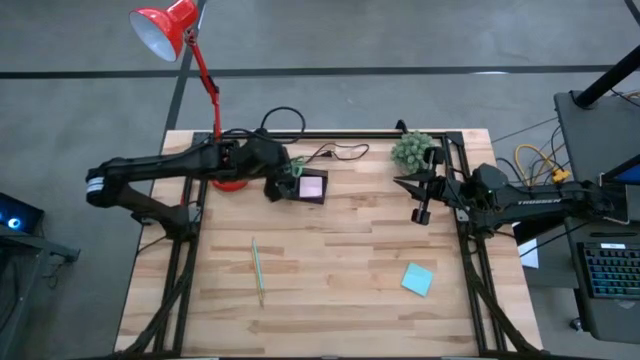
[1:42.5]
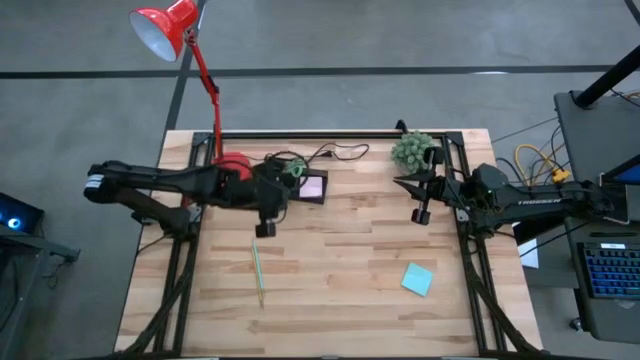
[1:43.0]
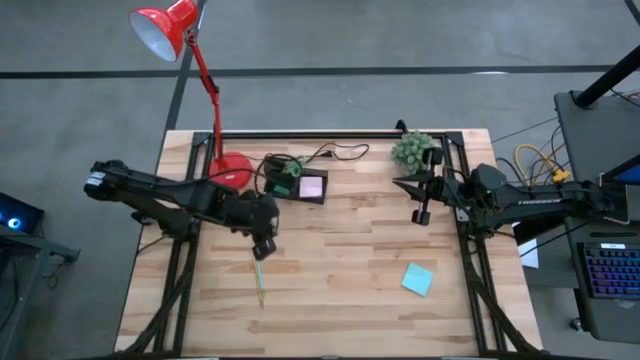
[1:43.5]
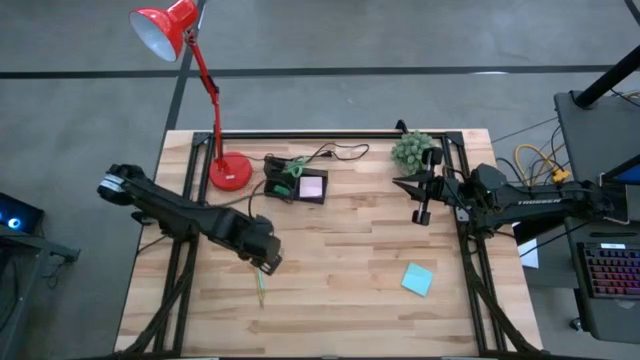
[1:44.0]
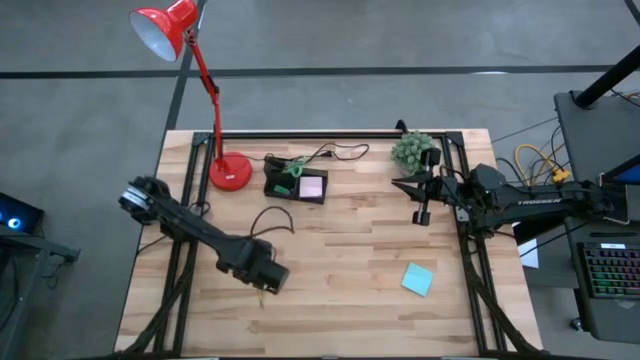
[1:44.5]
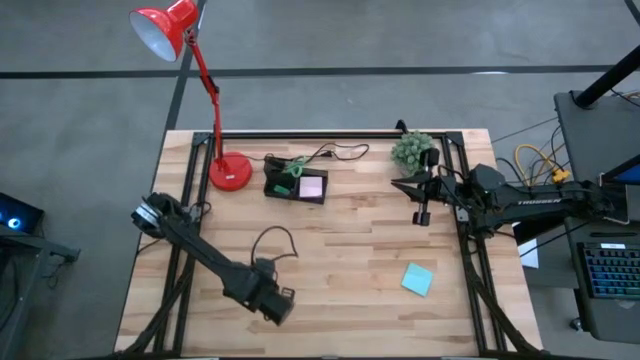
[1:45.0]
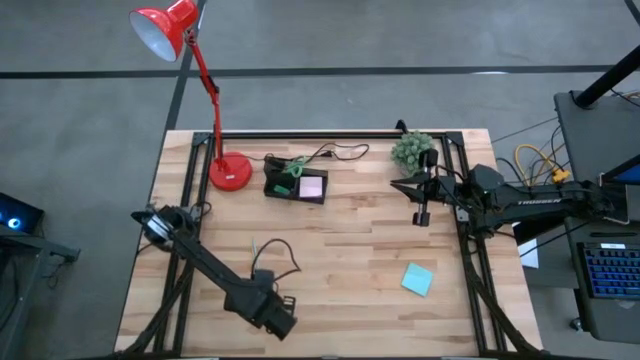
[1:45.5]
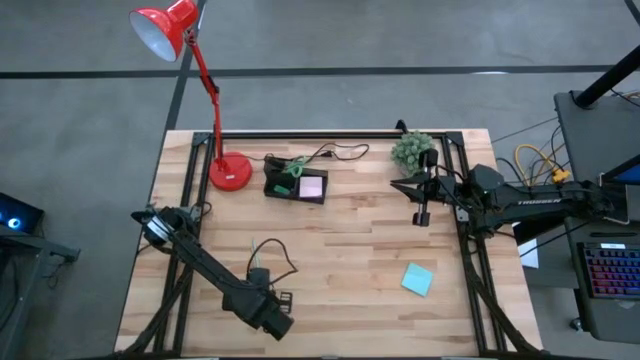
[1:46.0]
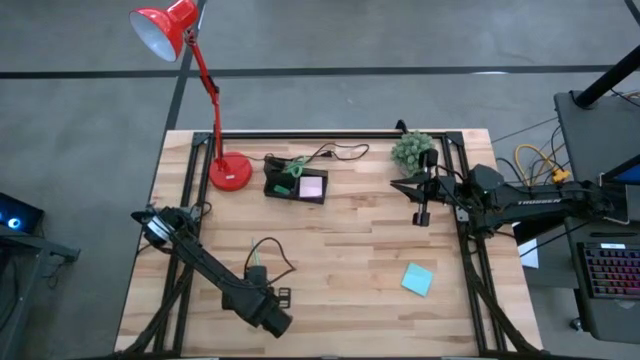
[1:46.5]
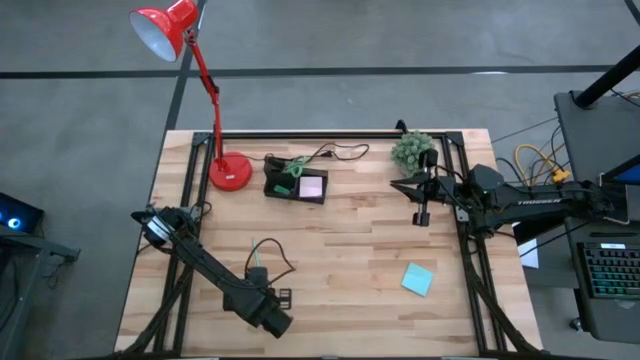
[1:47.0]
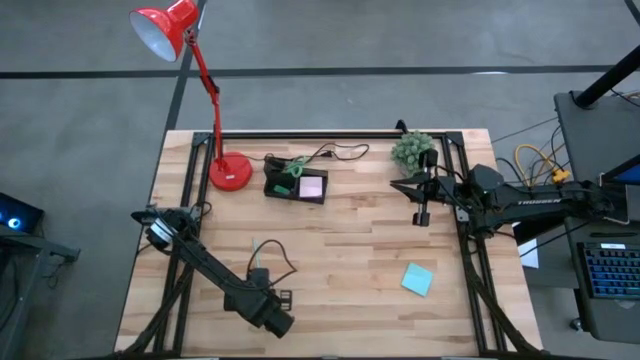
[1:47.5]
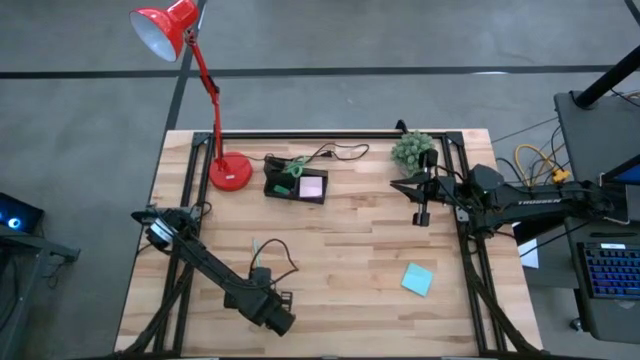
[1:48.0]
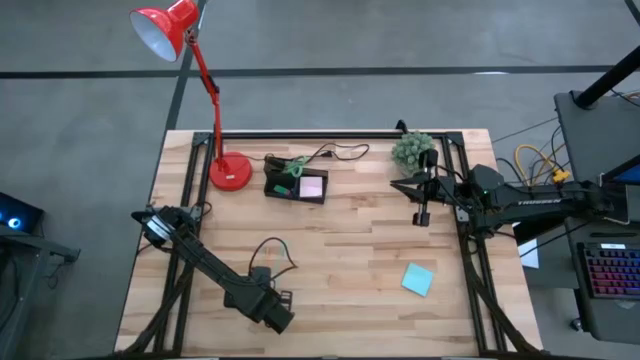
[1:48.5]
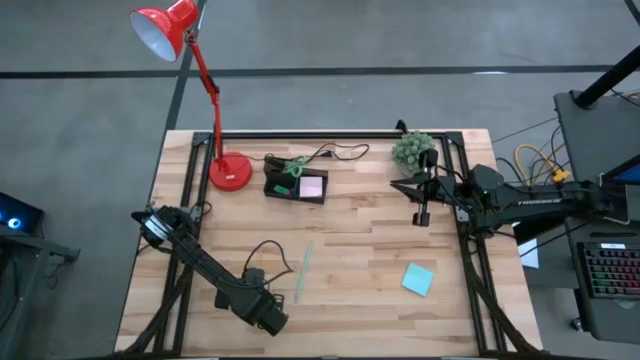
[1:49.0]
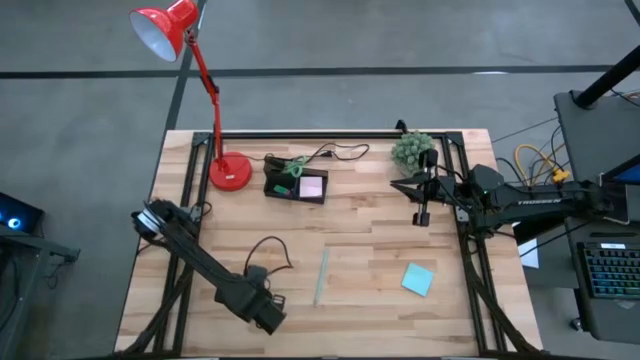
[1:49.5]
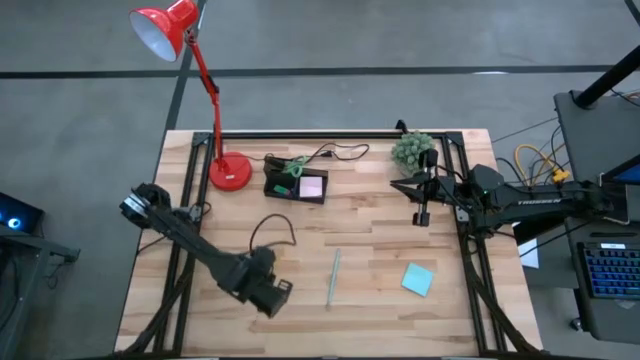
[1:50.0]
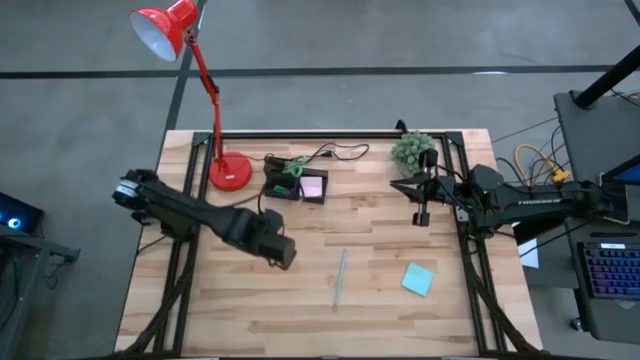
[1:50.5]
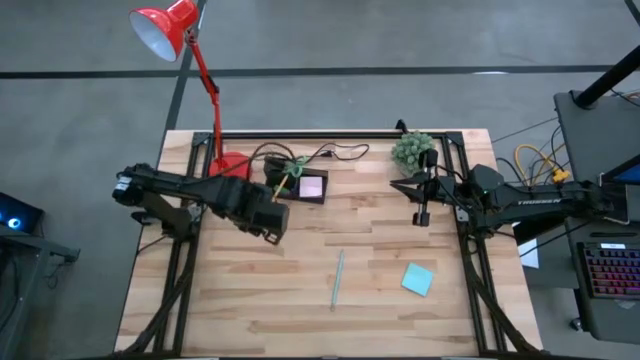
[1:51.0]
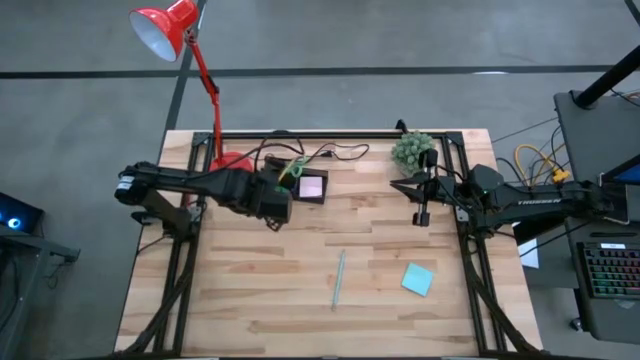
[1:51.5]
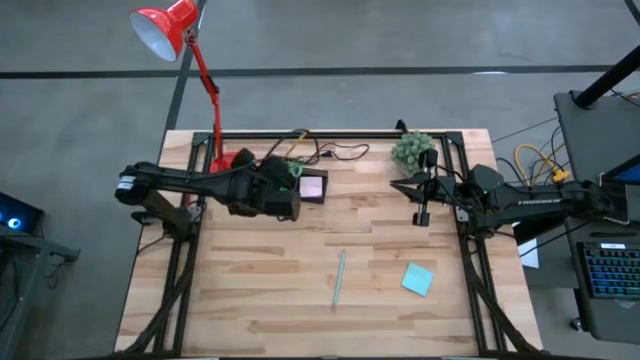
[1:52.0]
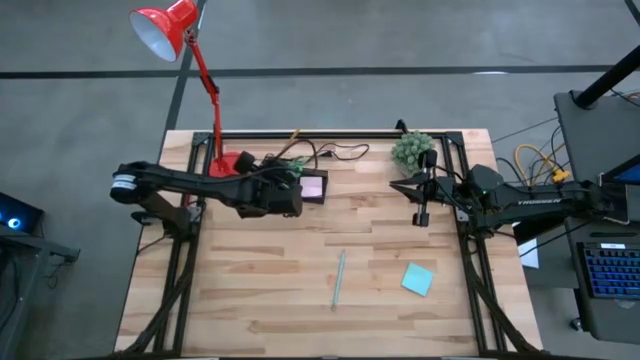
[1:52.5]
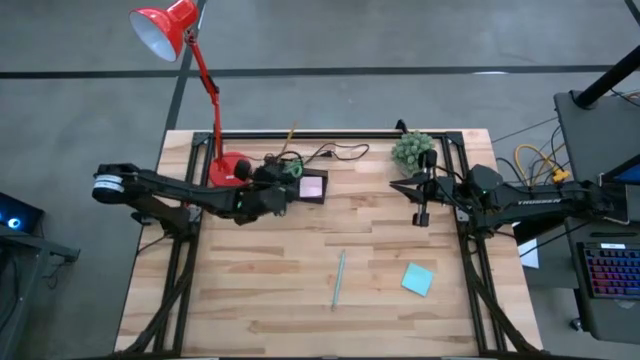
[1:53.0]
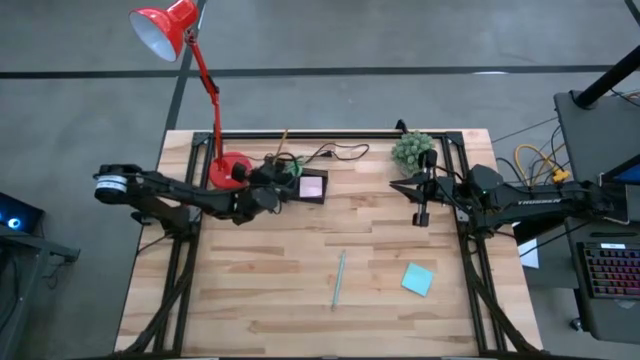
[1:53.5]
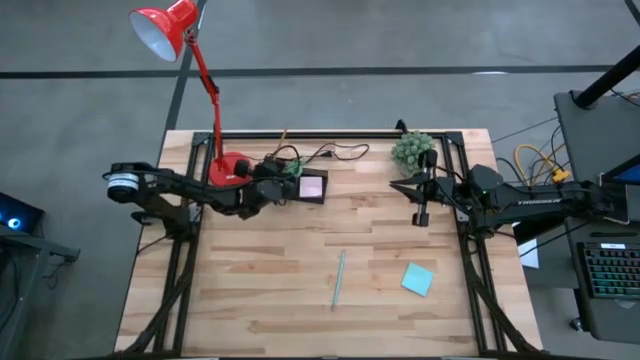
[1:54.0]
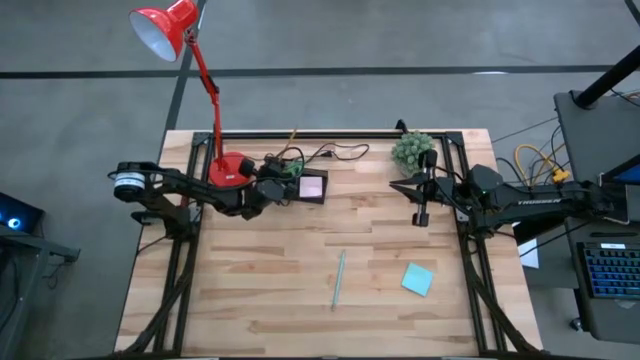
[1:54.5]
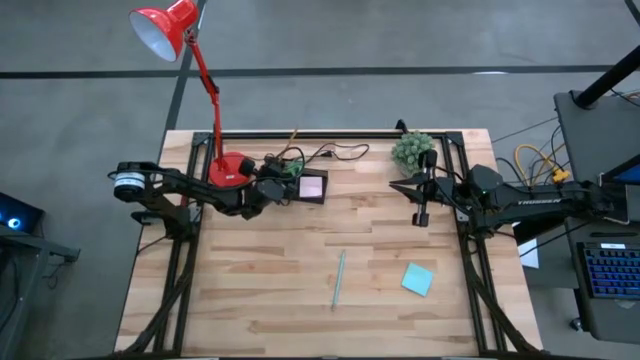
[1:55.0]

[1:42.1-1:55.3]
Task: Pick and place office supplies into organizer
Put the yellow pencil into the black mesh desk organizer

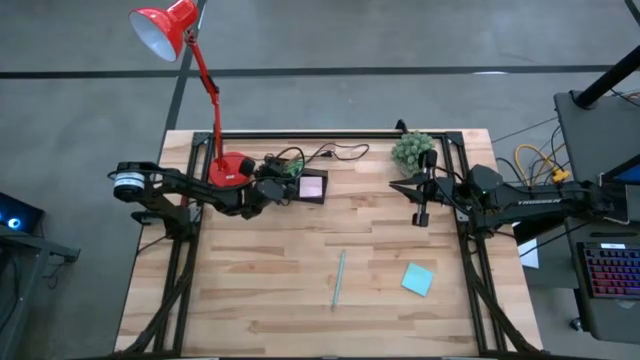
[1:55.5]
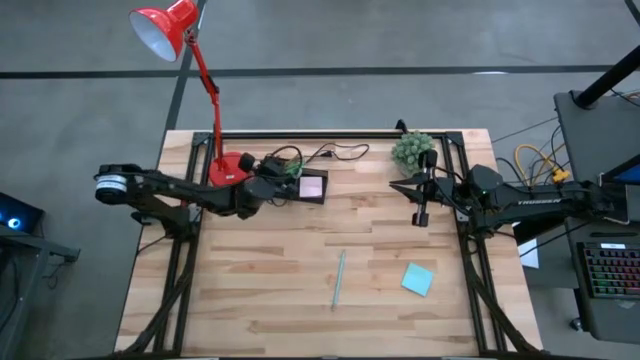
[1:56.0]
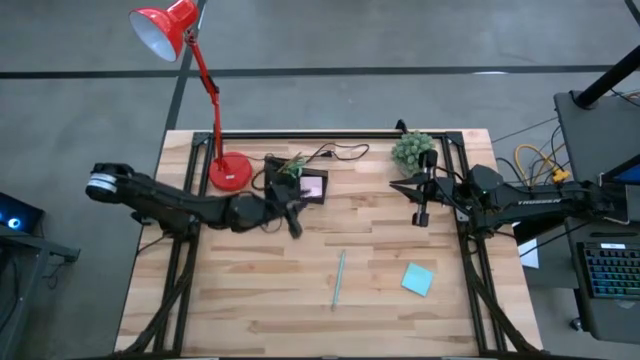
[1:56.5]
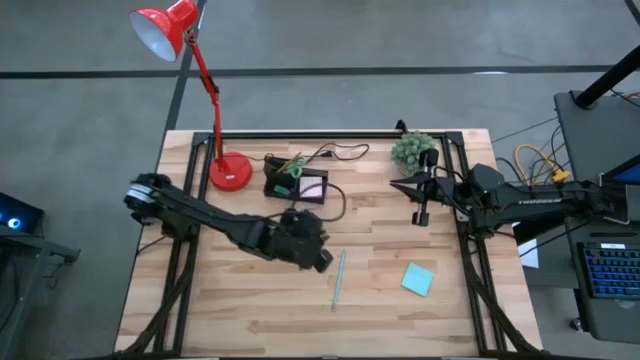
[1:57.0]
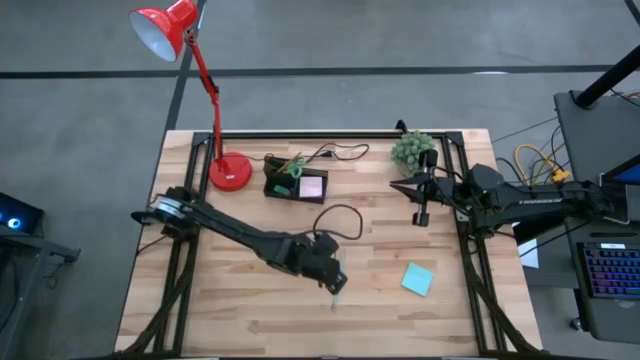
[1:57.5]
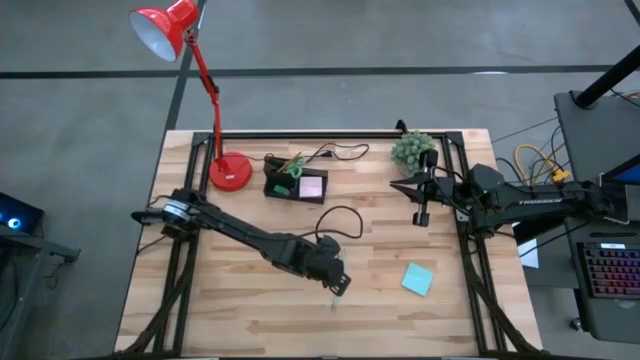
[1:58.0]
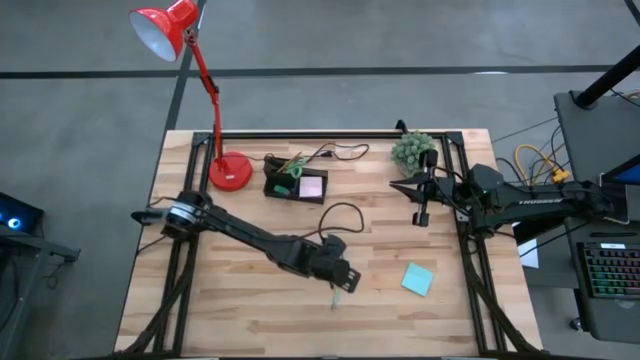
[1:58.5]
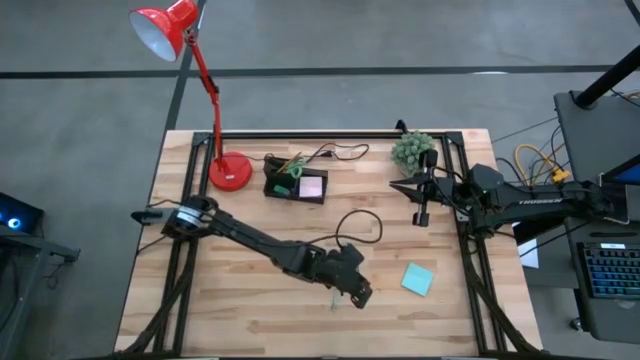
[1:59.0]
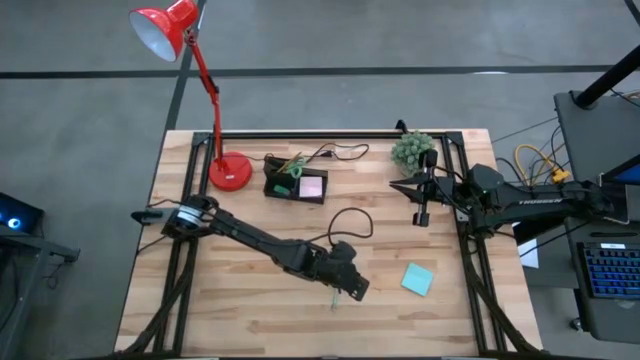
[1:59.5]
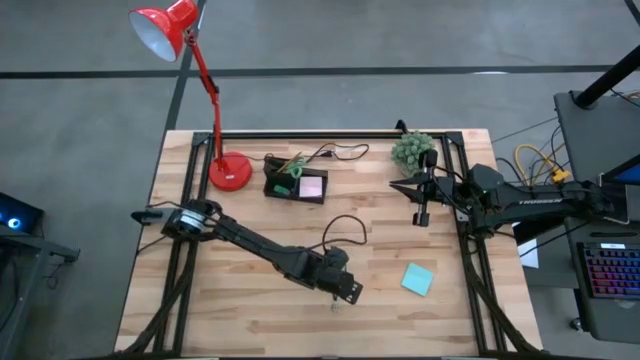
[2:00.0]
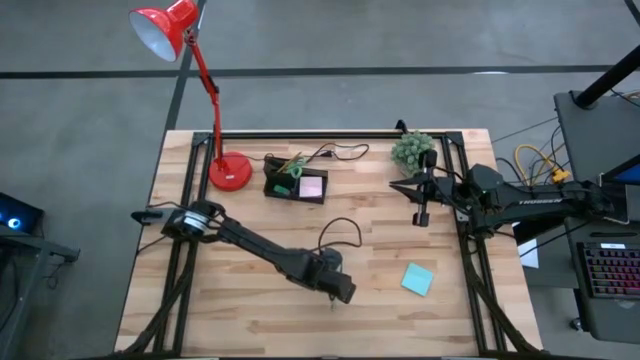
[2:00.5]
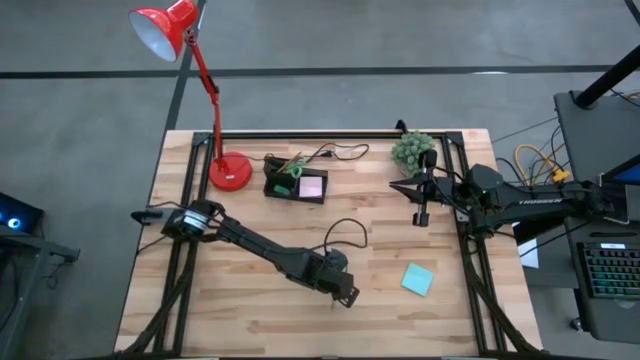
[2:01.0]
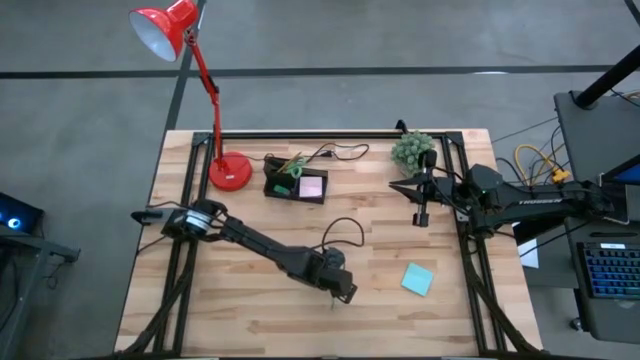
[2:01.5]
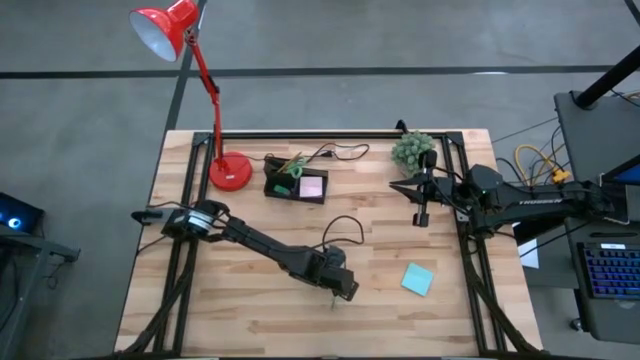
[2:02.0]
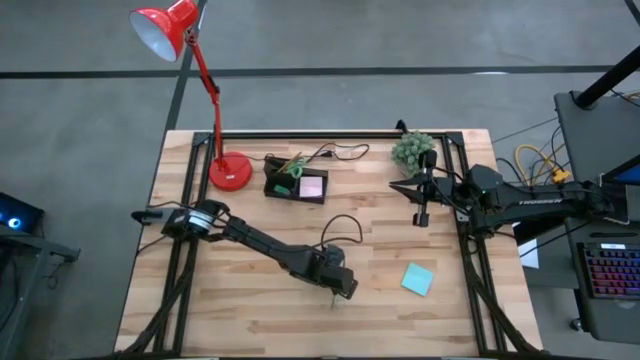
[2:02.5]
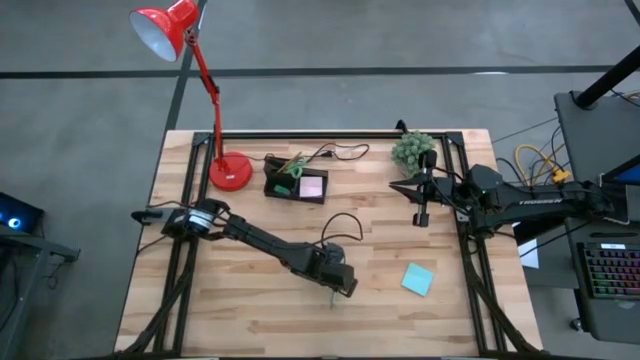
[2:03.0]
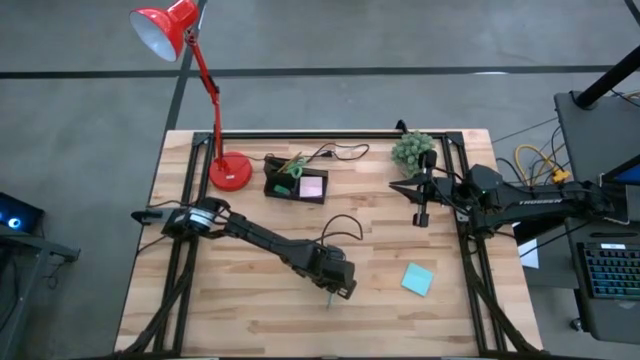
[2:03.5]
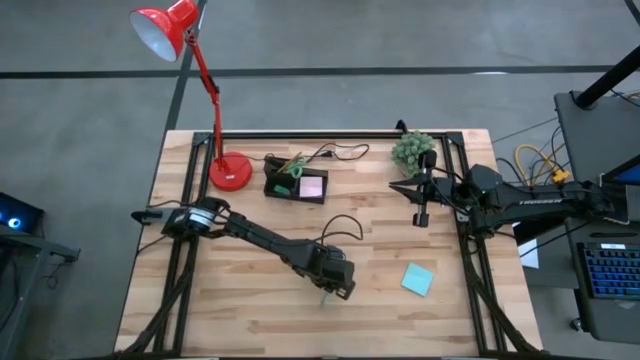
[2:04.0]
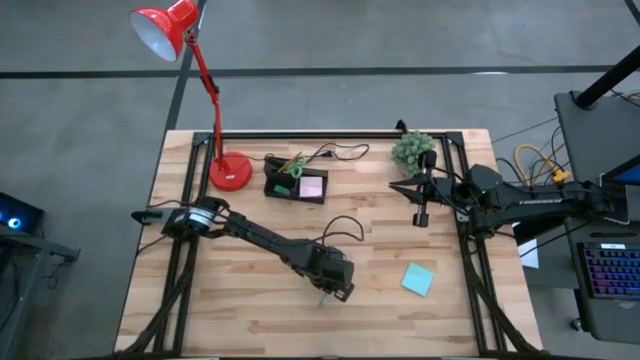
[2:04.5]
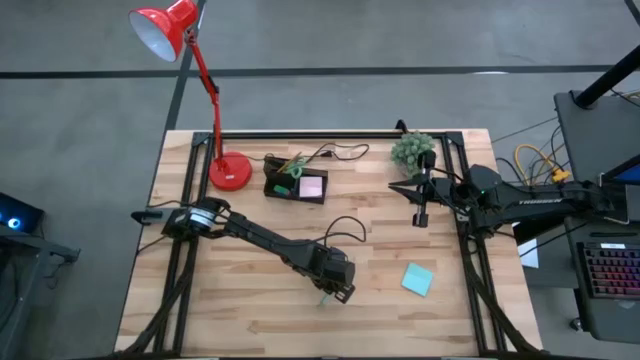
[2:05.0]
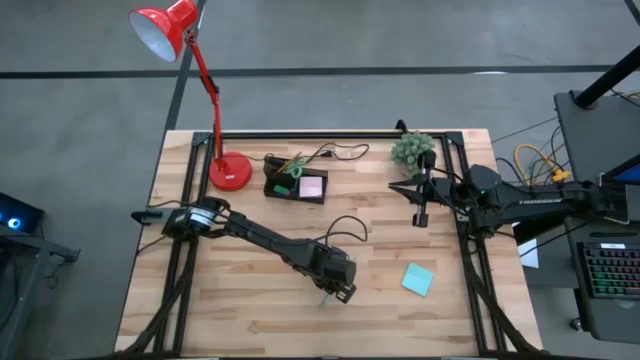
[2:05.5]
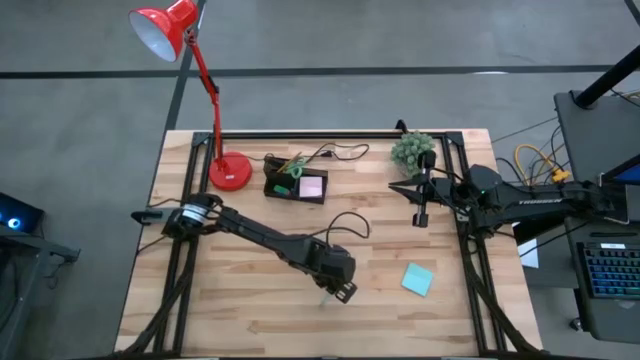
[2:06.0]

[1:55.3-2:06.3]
Put the blue pencil into the black mesh desk organizer
